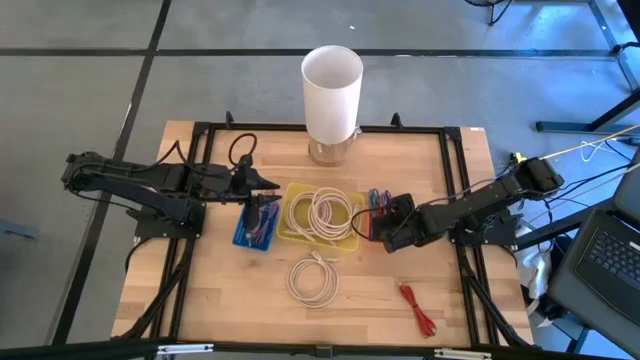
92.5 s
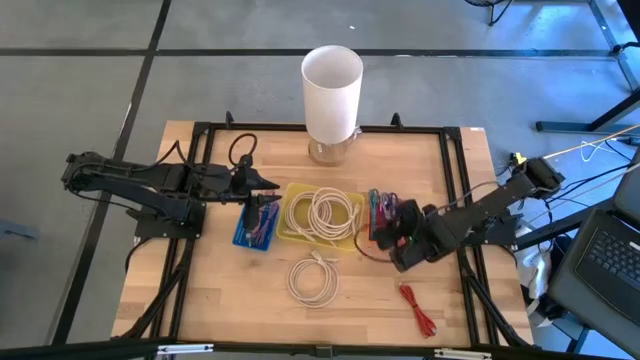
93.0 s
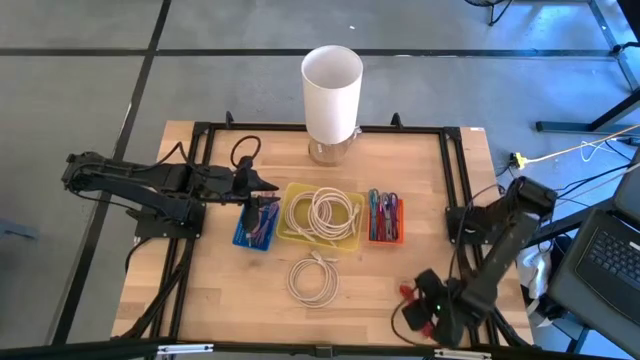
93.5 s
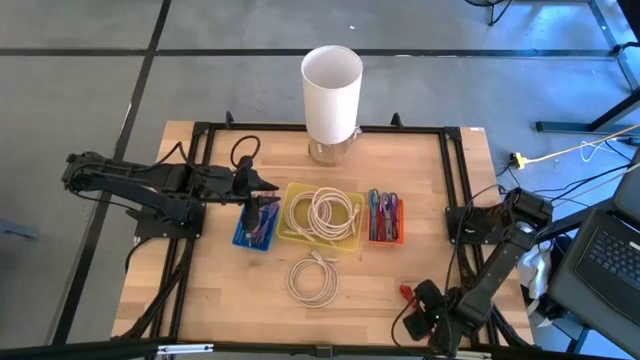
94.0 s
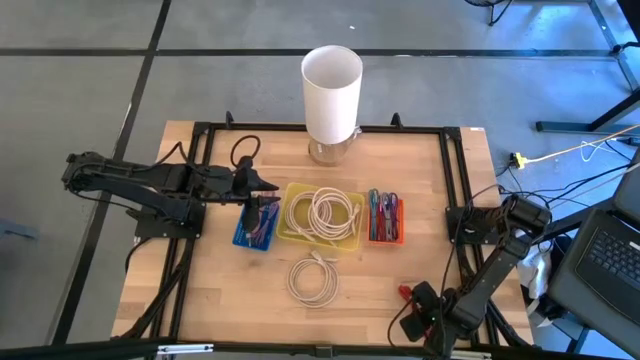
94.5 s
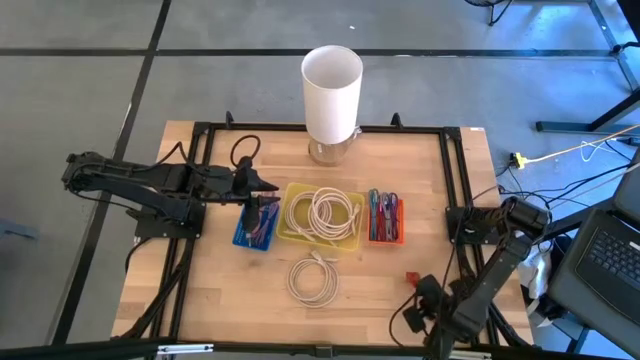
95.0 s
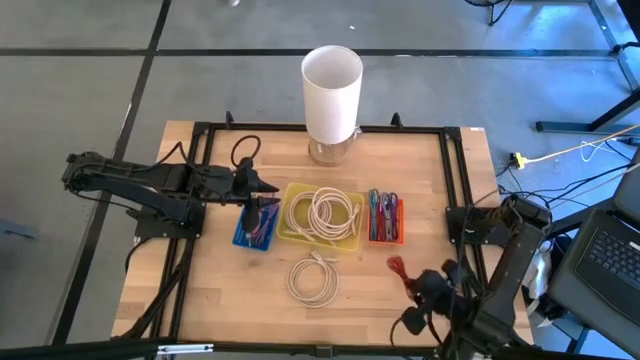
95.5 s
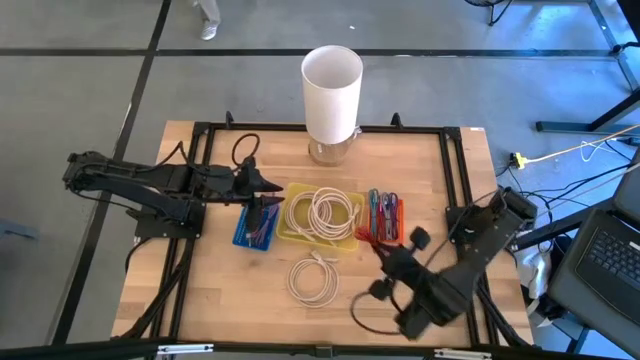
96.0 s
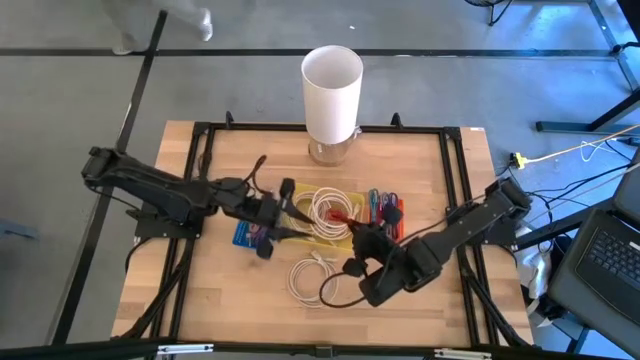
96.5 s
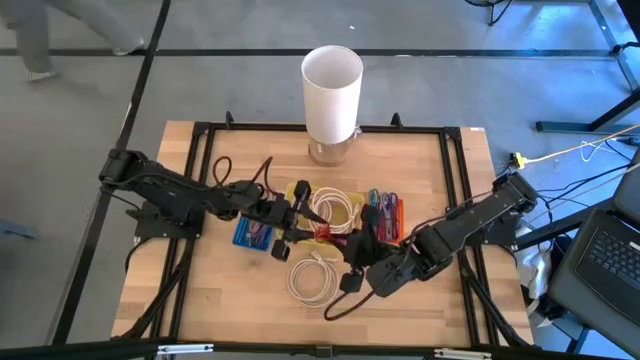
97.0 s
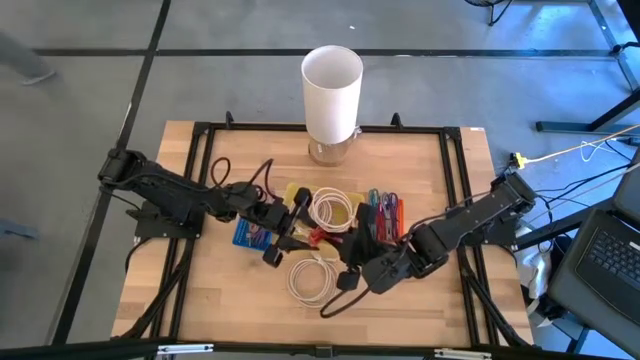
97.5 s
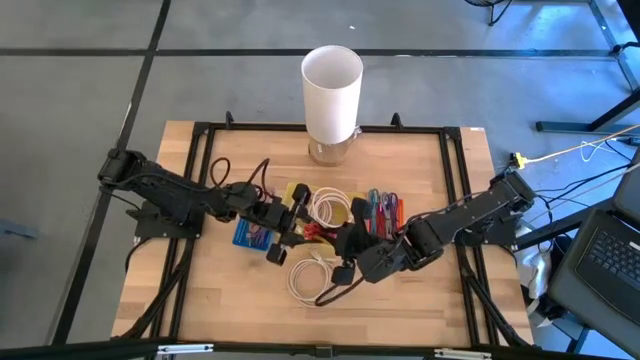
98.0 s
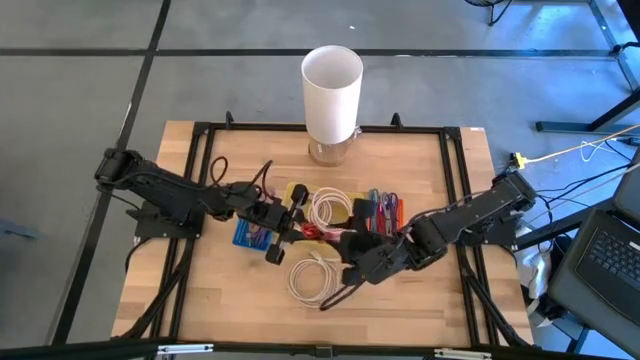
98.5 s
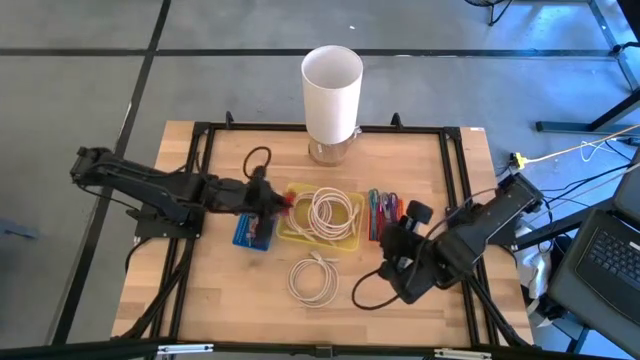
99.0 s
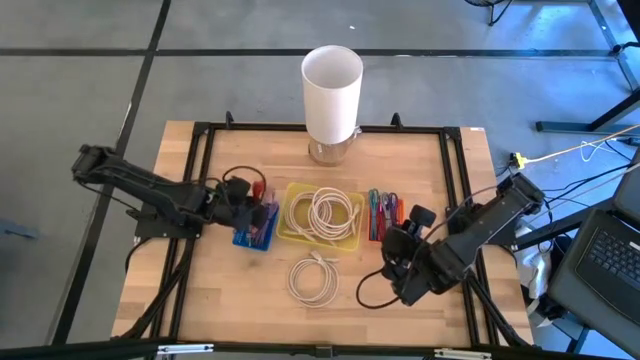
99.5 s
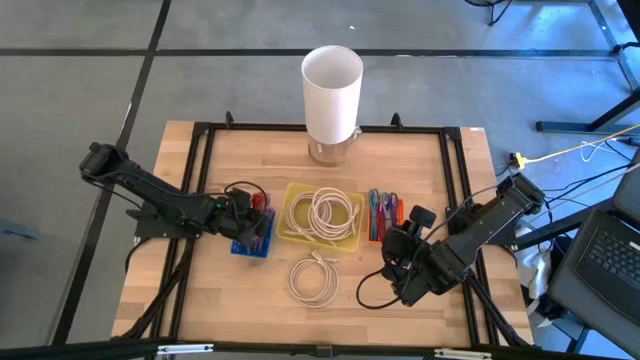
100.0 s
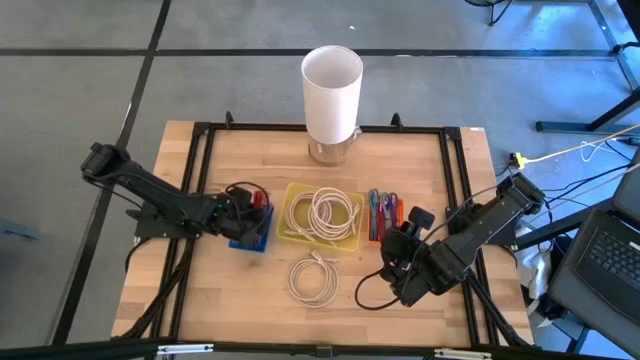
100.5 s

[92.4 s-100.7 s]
Task: Pick & Place USB Port
Put the orange USB cable into the blue bin

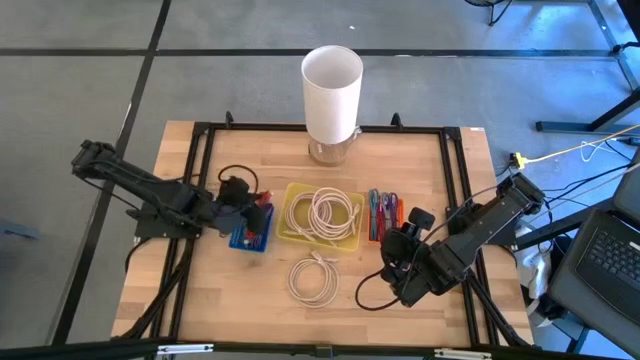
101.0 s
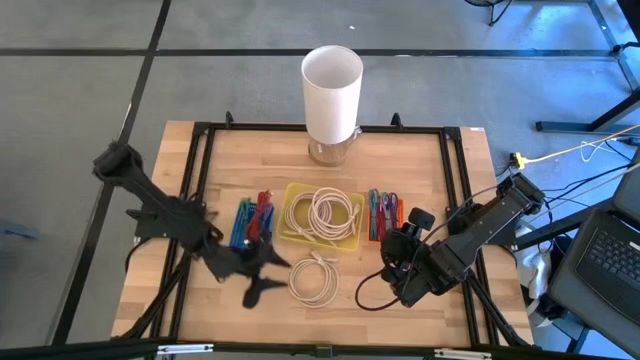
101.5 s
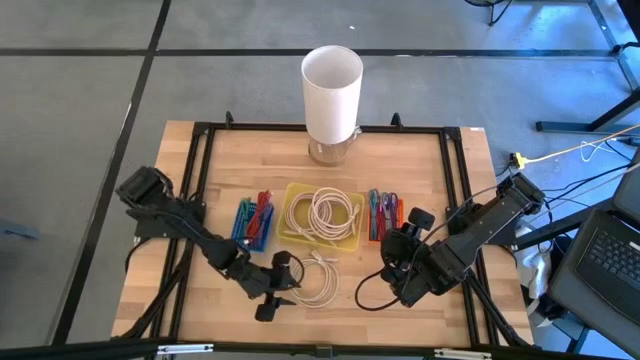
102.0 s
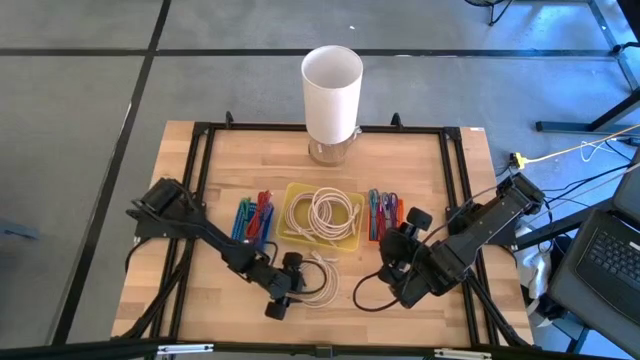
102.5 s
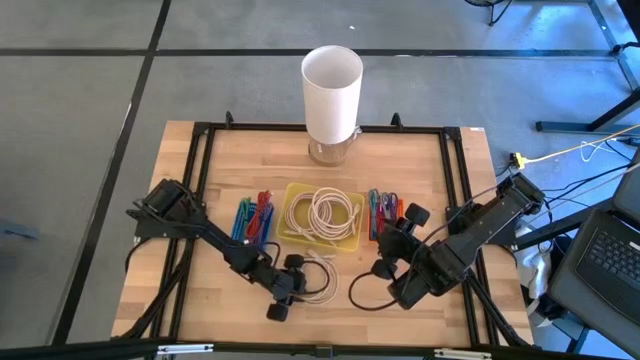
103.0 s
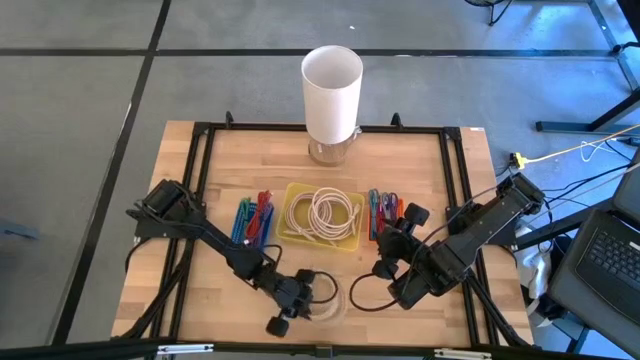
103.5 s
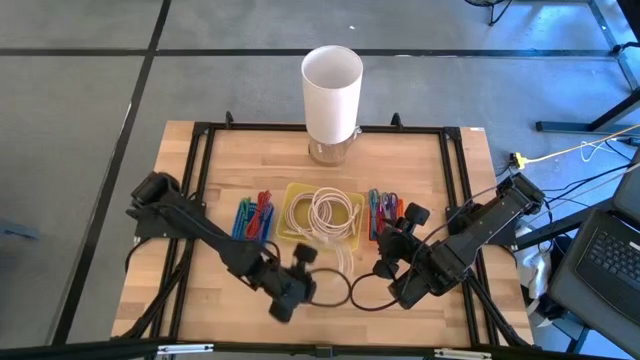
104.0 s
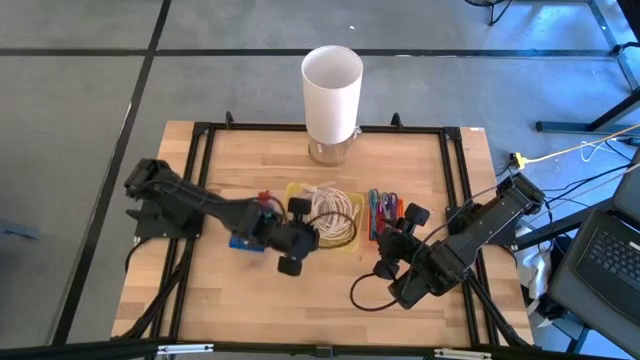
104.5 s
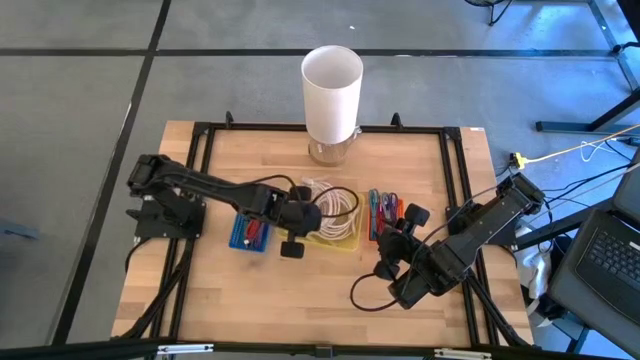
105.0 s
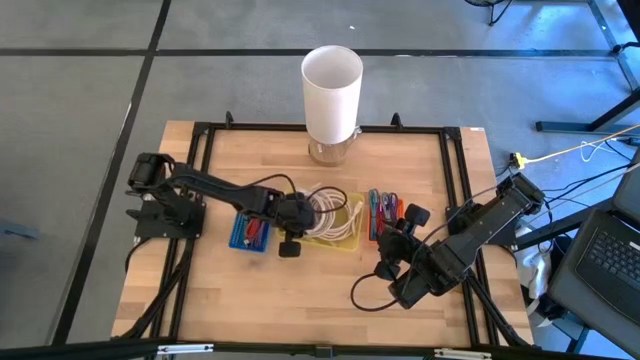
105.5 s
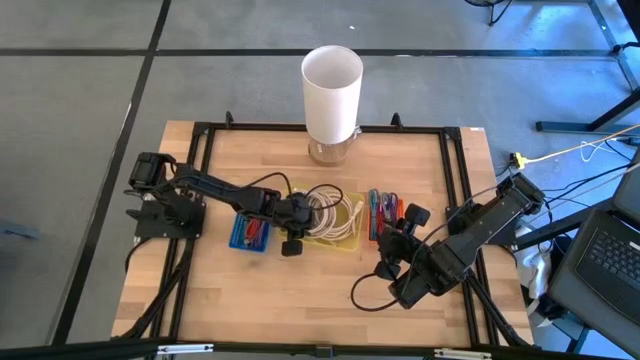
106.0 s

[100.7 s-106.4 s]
Put the light brown HDMI cable into the yellow bin

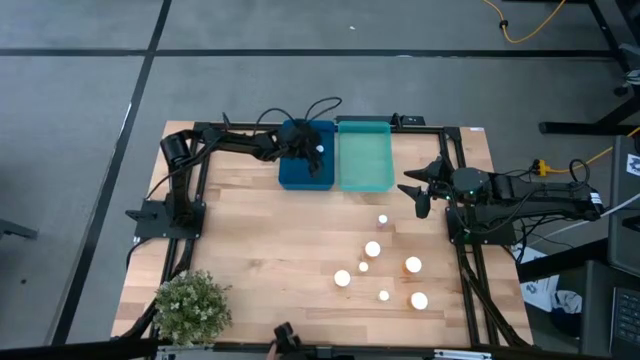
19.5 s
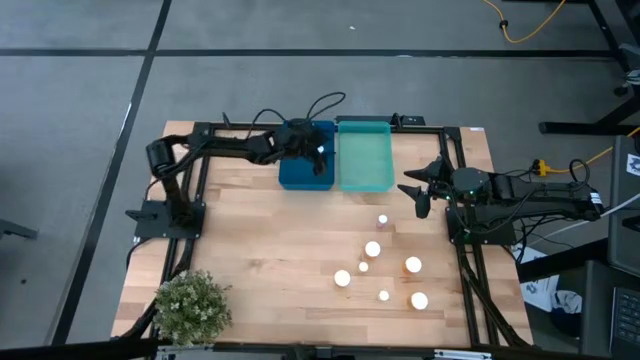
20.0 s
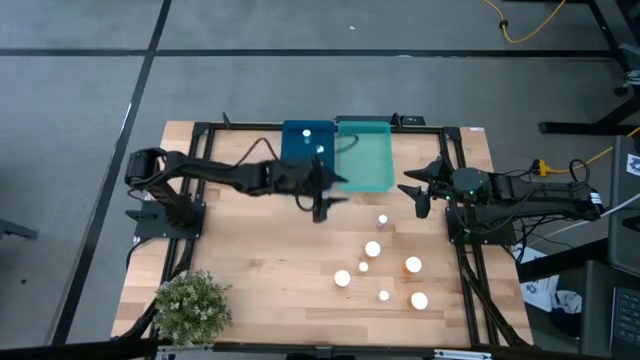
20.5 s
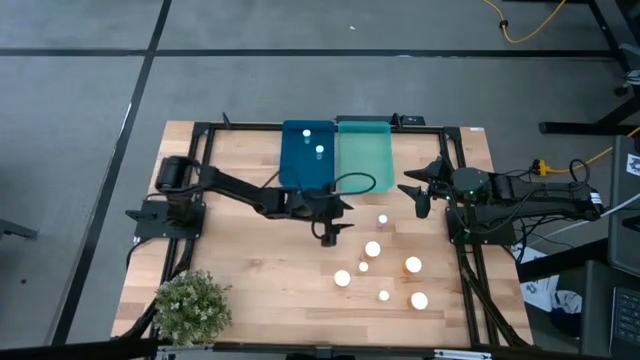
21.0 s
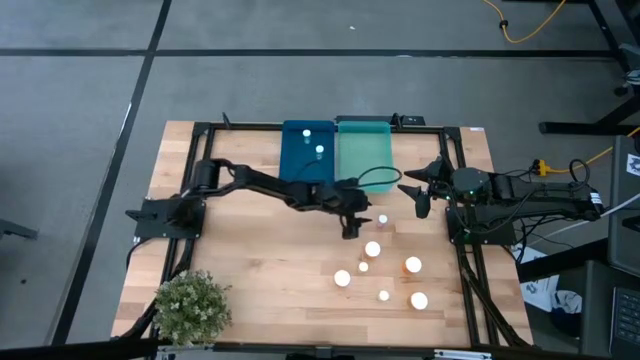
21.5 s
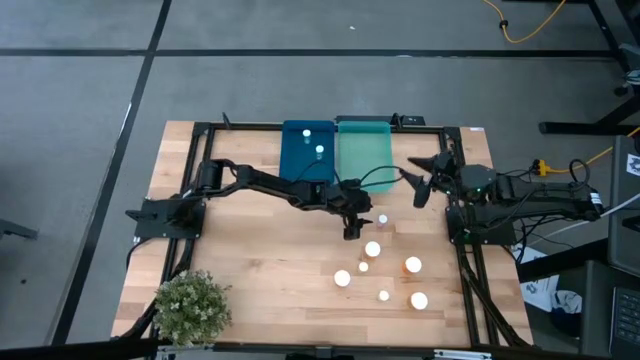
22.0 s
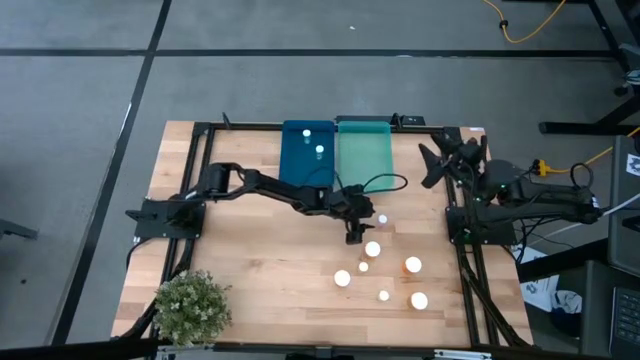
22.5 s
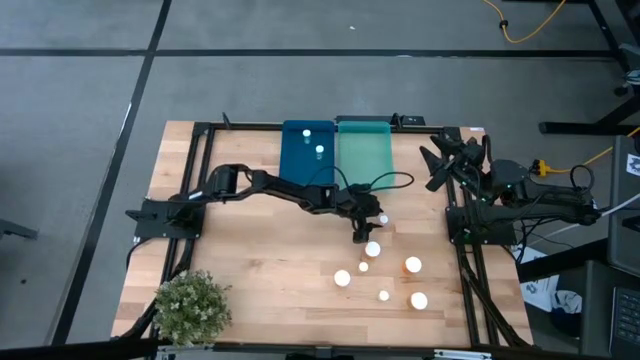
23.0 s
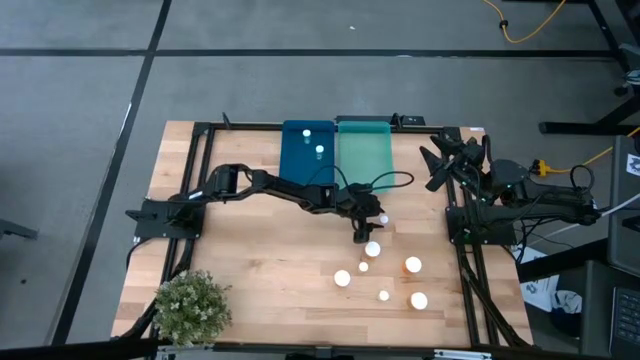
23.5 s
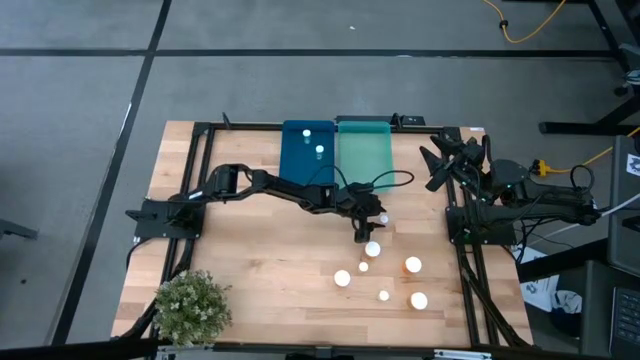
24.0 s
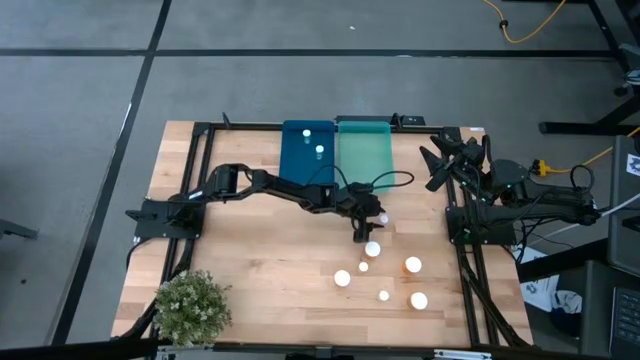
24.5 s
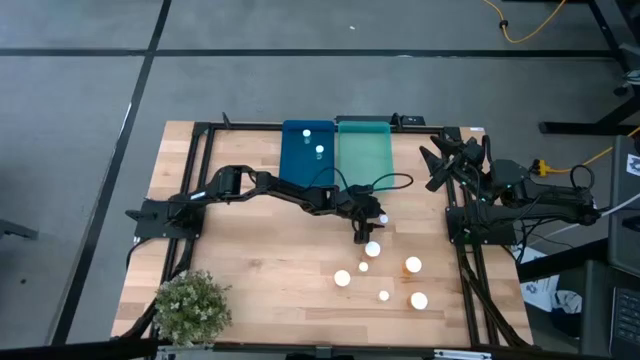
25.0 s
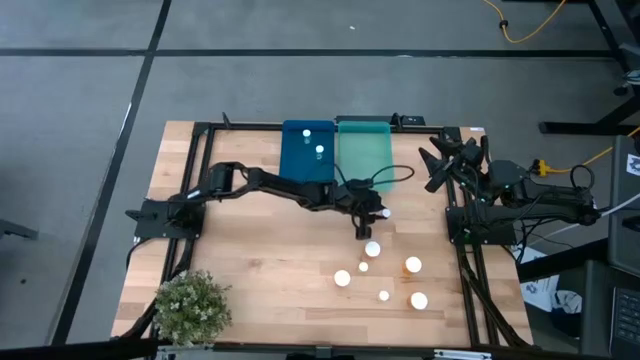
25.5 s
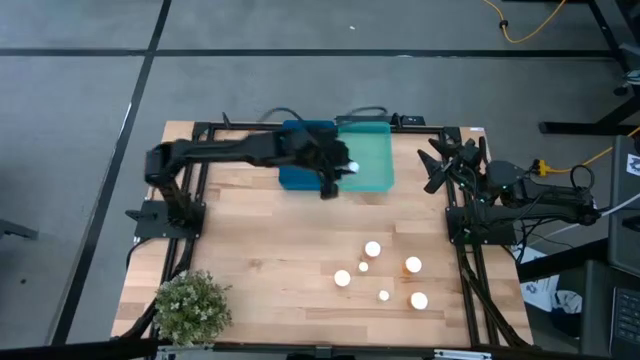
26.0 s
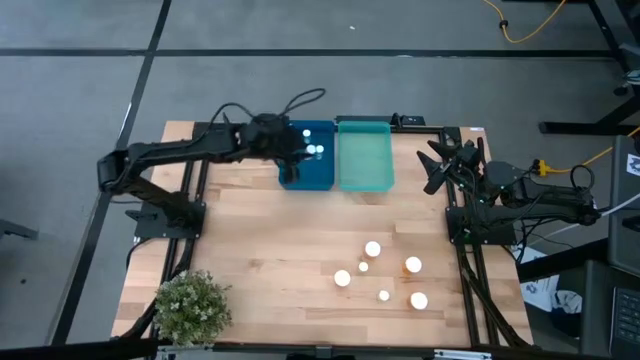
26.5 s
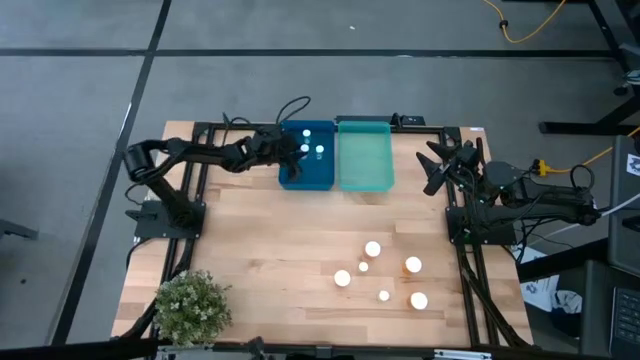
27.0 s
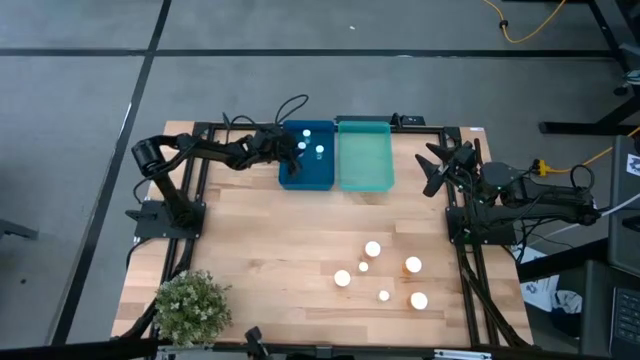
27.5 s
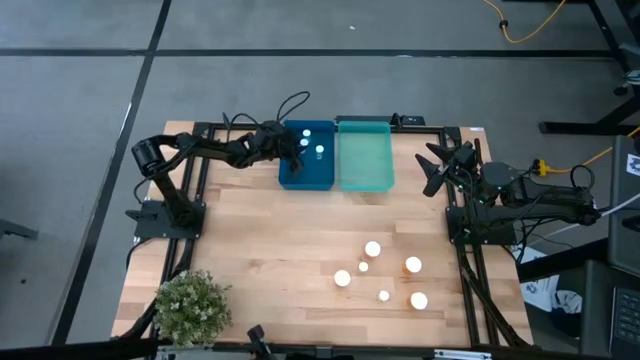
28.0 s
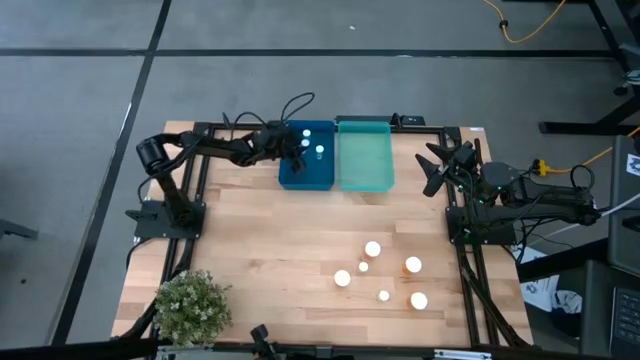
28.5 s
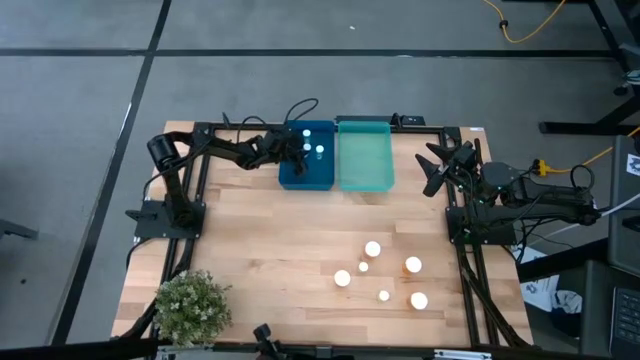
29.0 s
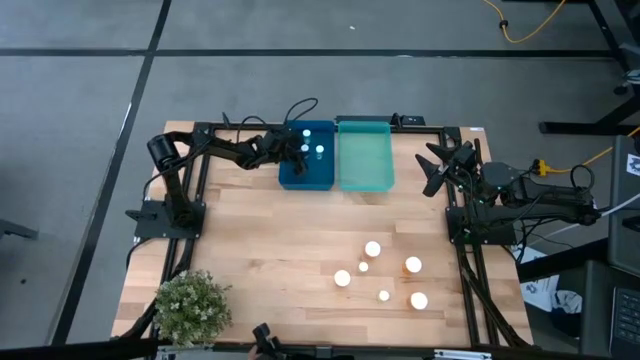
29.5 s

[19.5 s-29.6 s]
Task: Pick and place medicine bottles into bin by pill shape (circle, oval)
Put the pink pill bottle into the blue bin
